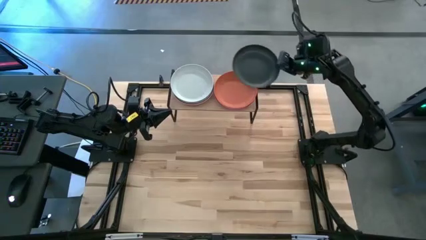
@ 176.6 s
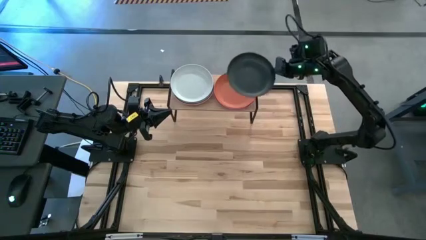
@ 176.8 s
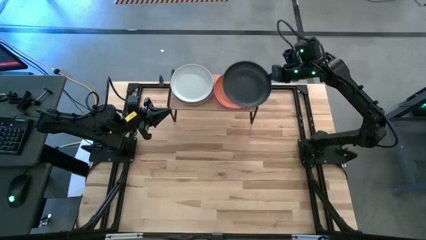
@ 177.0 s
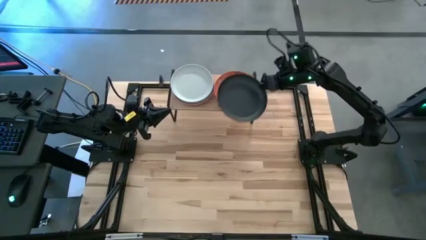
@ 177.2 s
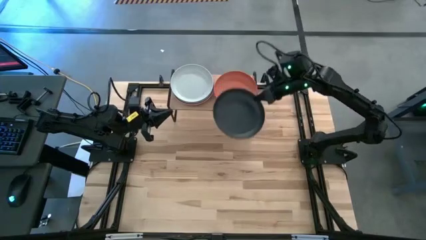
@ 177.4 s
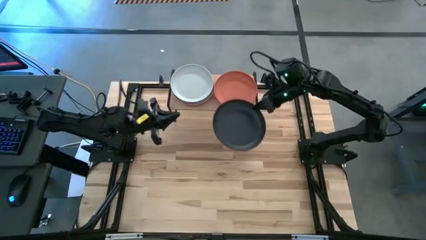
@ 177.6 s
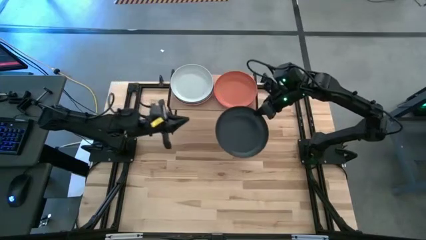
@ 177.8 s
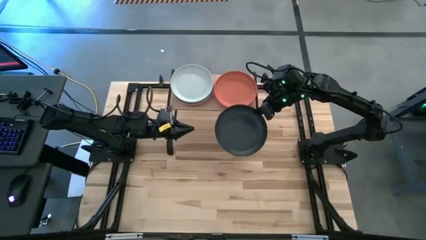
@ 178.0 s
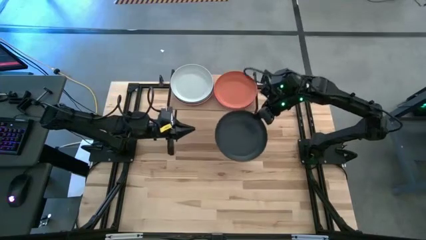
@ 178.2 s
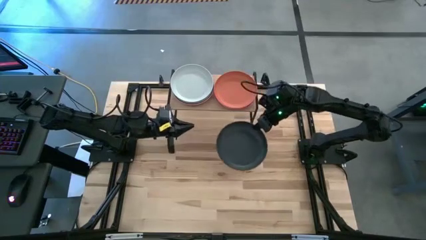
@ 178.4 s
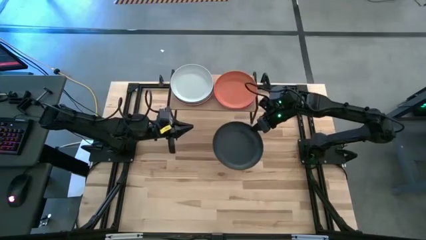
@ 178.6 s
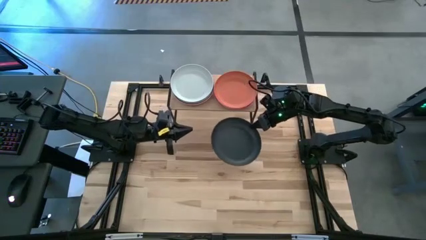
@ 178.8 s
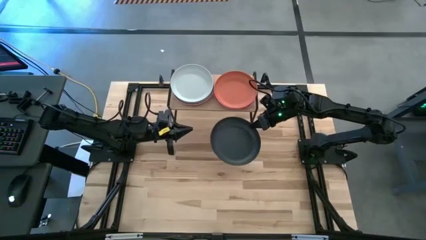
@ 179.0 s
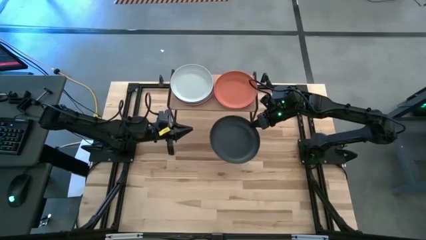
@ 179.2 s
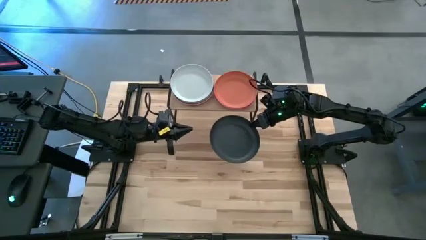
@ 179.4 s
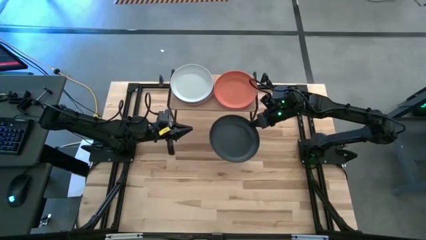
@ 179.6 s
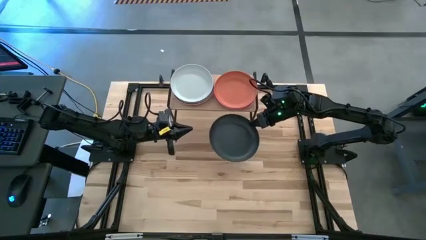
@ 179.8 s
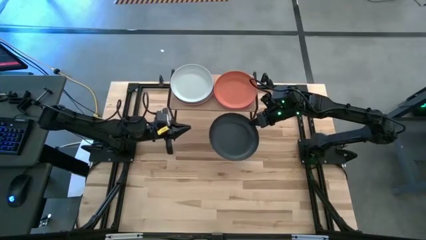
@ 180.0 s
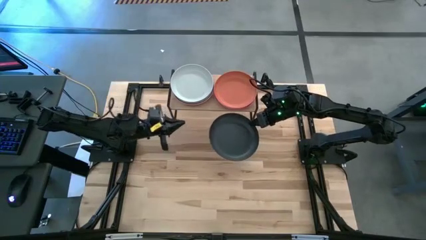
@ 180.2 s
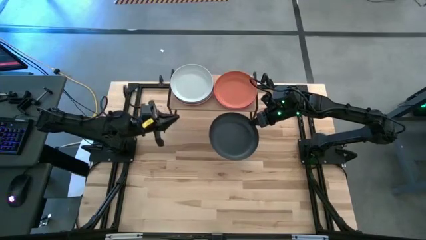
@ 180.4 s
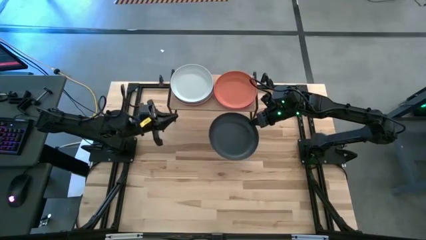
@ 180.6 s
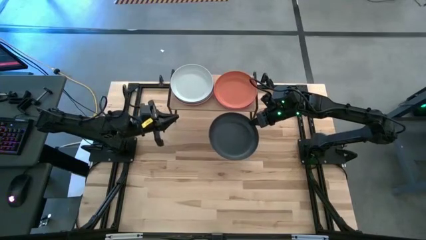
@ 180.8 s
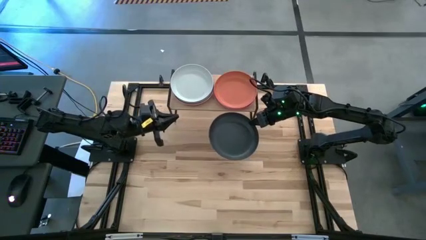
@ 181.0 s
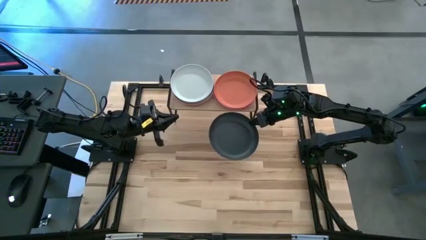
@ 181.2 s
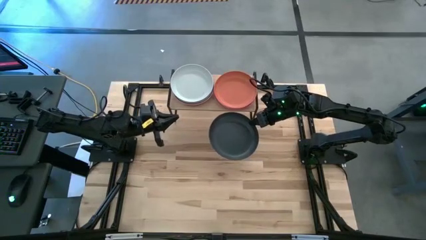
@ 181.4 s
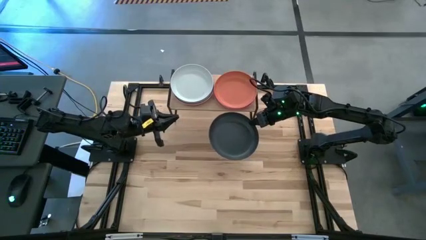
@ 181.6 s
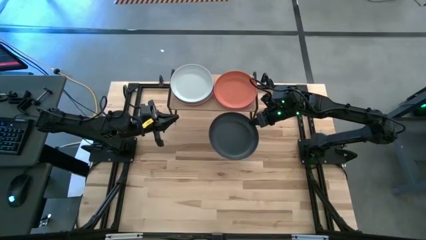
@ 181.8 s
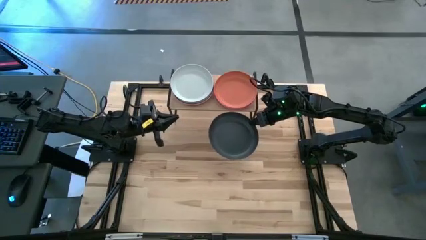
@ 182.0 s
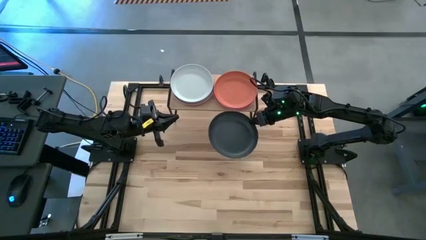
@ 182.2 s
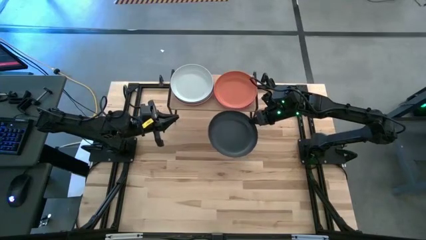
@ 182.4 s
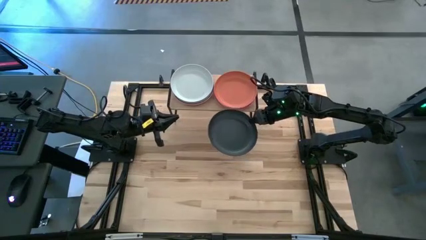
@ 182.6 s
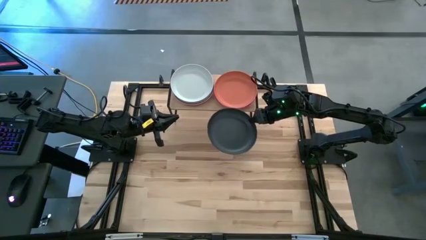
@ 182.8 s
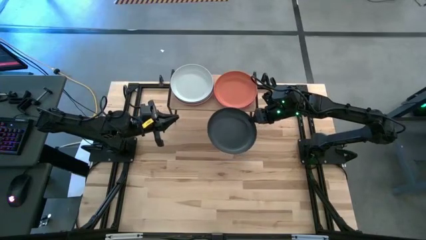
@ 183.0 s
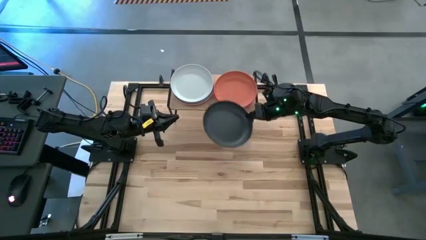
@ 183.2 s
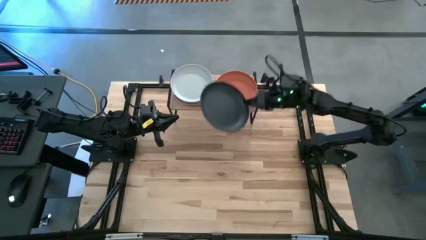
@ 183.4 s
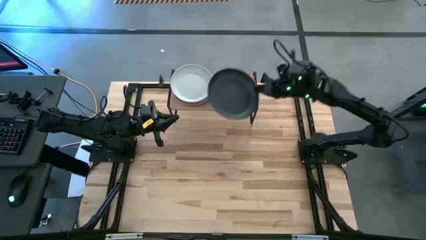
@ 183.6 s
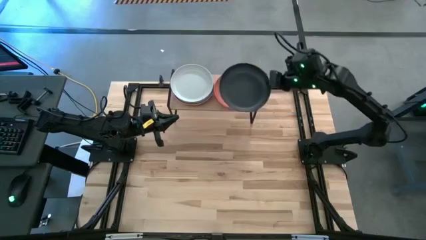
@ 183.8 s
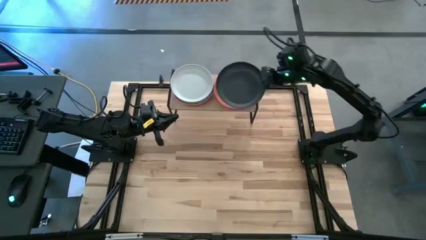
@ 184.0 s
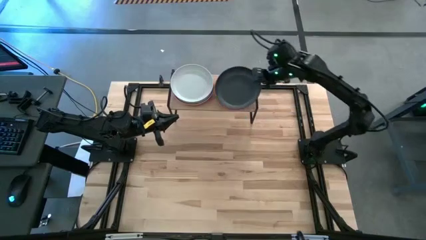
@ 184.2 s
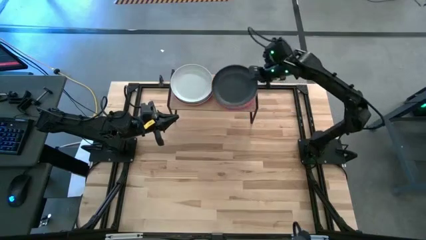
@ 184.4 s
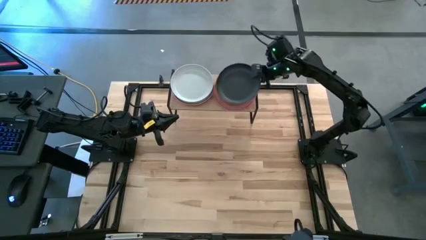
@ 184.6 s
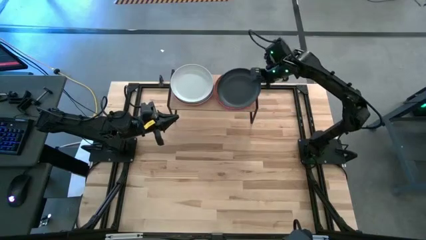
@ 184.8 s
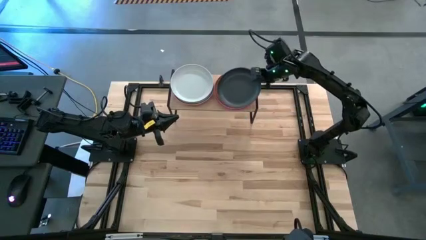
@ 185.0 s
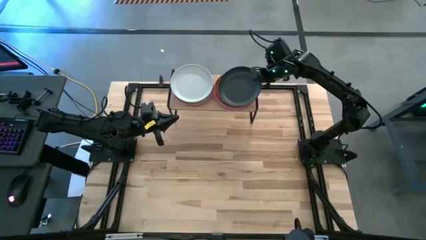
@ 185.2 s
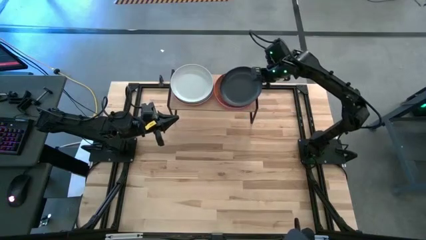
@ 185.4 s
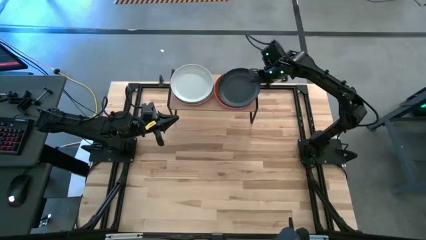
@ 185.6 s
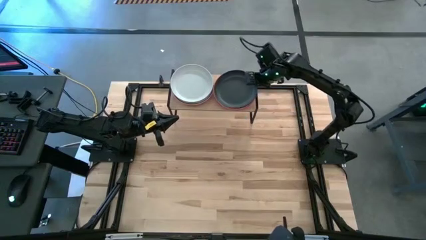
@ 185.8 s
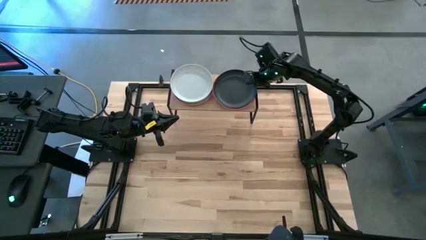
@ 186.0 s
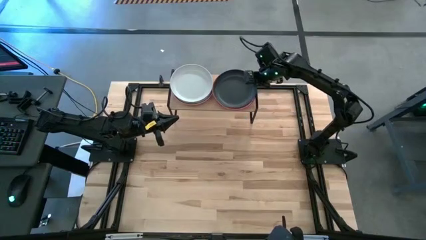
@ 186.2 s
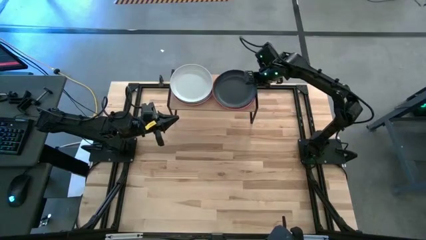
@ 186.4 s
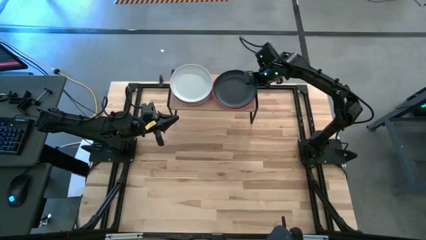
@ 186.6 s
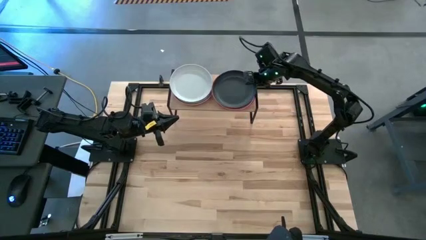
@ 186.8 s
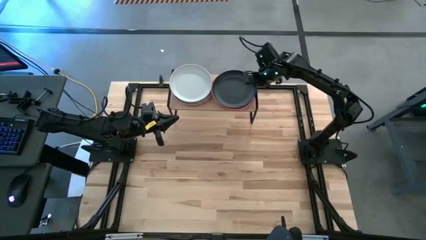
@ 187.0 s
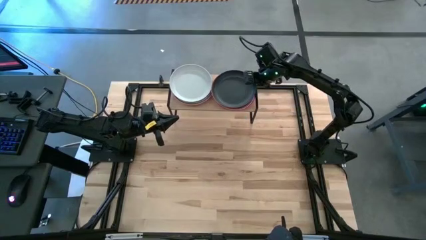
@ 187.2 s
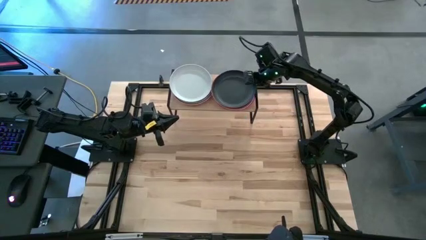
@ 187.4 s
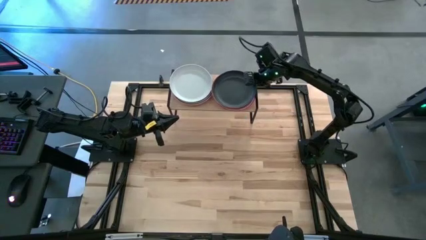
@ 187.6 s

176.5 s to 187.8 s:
Task: Place and stack plates onto a shelf
Stack the black plate on top of the brown plate

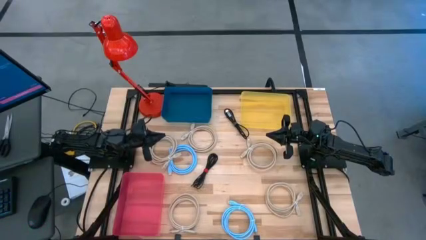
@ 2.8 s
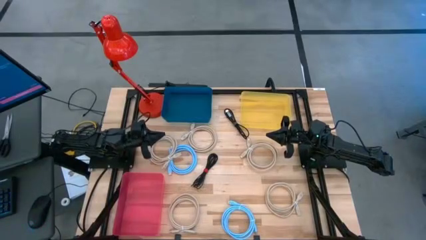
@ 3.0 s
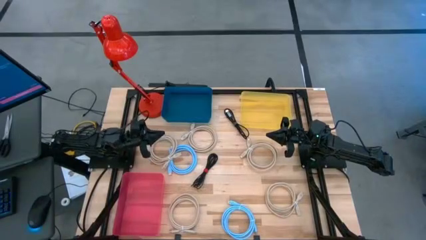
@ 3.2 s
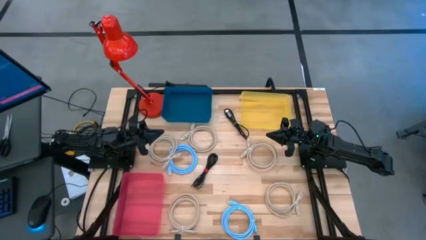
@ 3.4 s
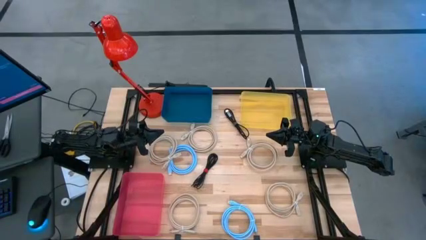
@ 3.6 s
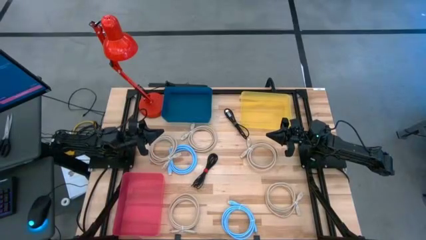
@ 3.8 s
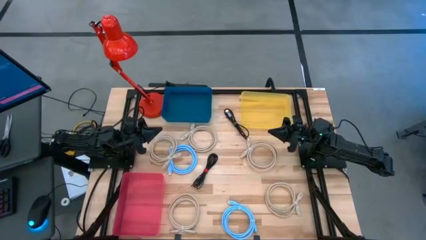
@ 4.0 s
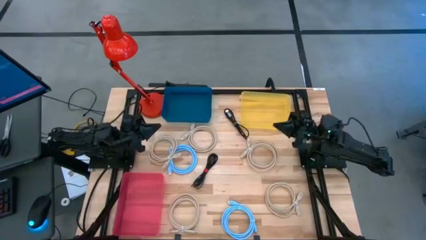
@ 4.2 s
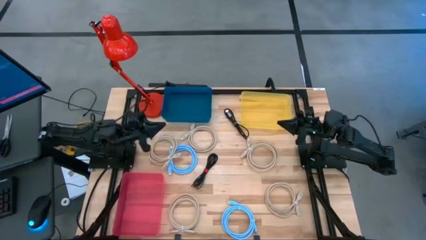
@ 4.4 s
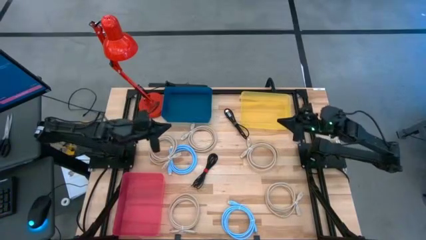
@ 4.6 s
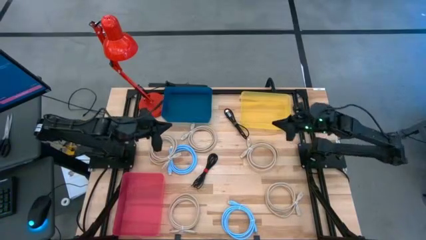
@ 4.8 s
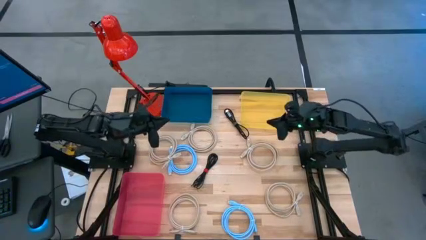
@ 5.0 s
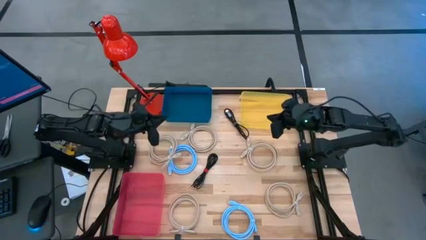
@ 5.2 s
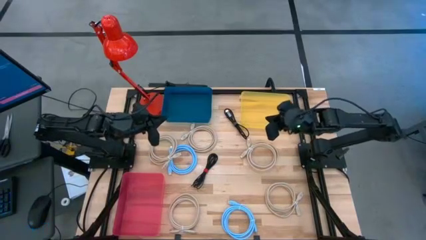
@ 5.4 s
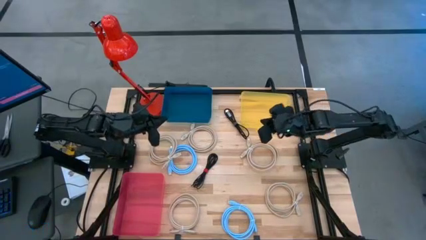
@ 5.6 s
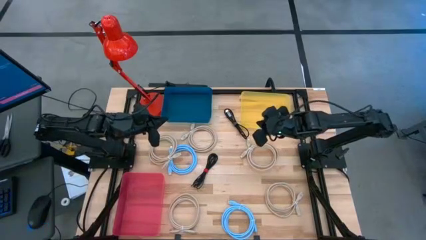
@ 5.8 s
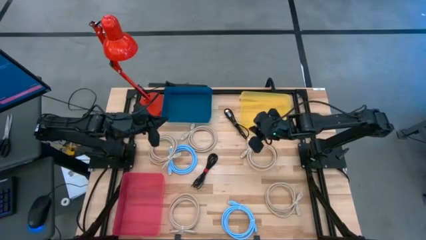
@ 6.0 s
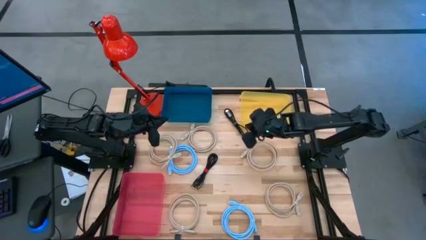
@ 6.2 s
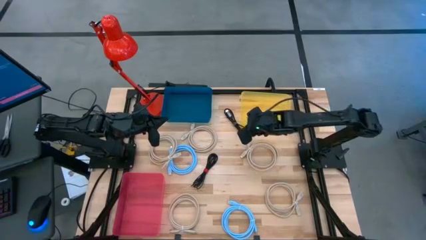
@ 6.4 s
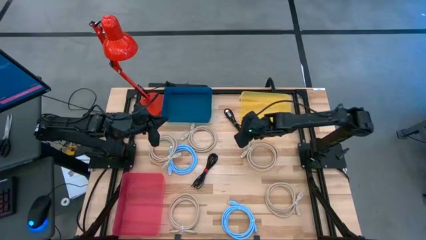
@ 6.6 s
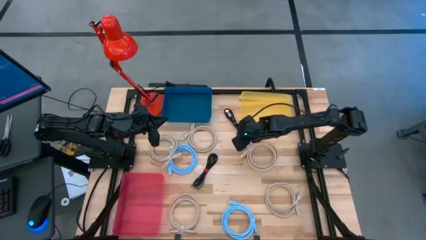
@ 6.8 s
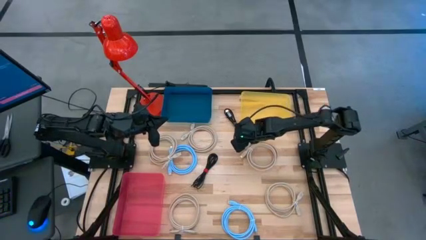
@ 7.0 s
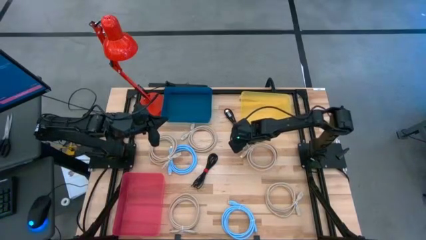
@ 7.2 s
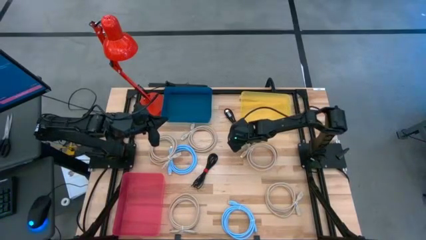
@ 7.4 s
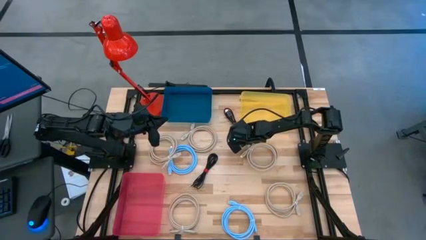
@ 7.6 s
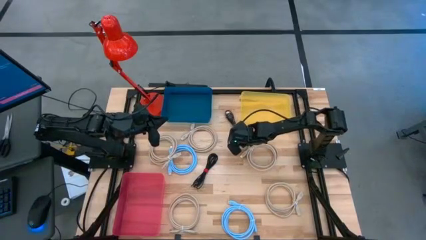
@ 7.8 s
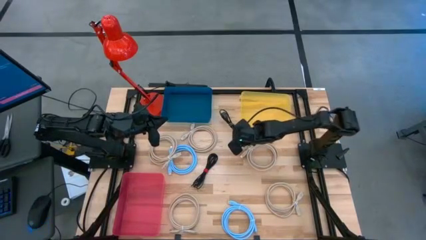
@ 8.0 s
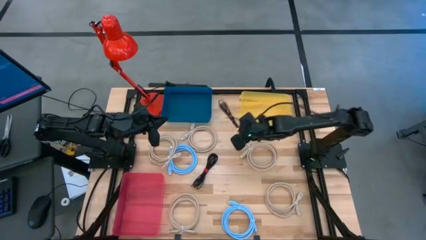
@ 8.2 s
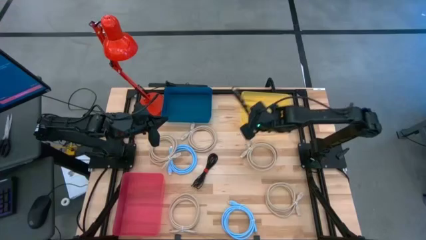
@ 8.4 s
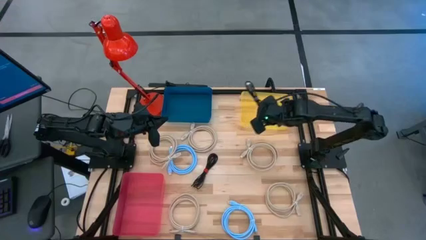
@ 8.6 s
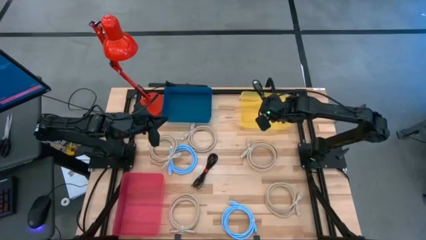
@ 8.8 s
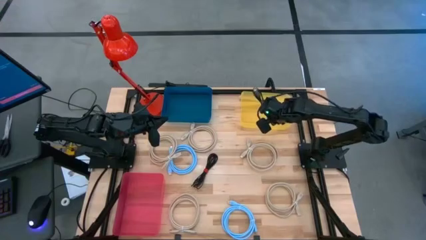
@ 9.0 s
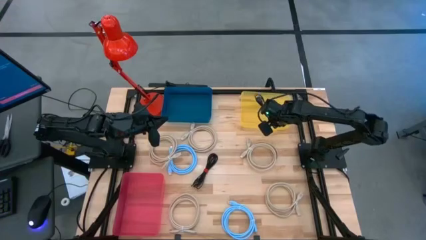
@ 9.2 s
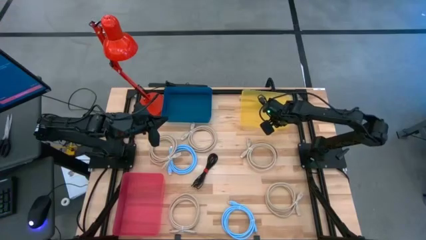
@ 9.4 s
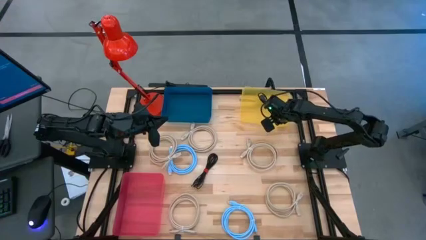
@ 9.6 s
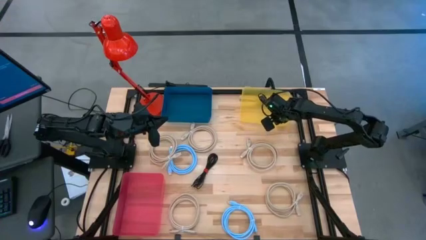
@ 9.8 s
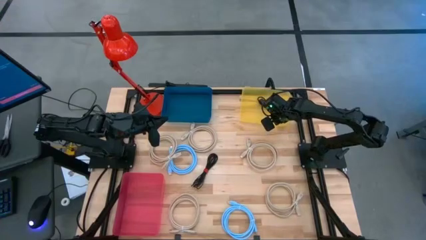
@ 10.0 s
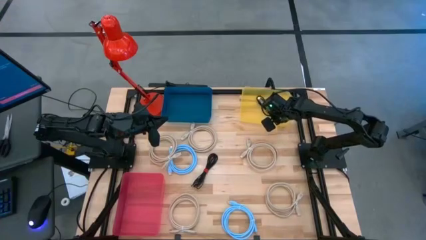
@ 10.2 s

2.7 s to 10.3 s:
Task: Pick & Place USB Port
Put the black charger cable into the yellow bin
